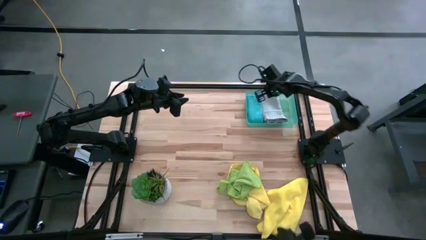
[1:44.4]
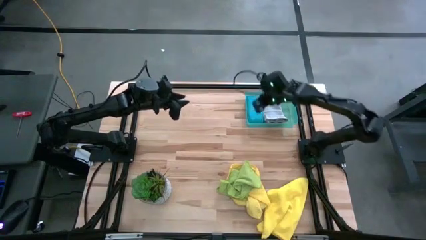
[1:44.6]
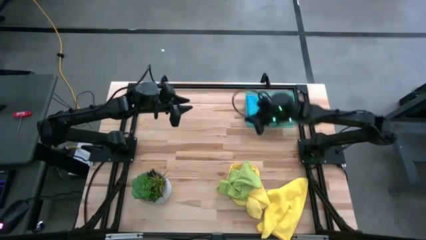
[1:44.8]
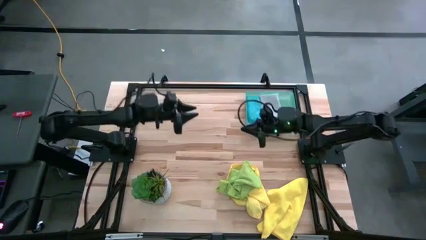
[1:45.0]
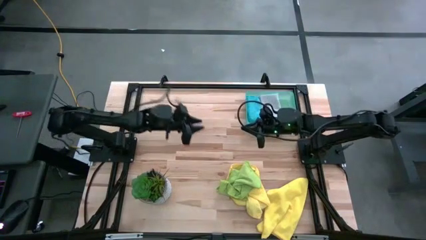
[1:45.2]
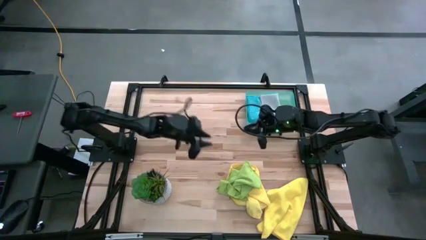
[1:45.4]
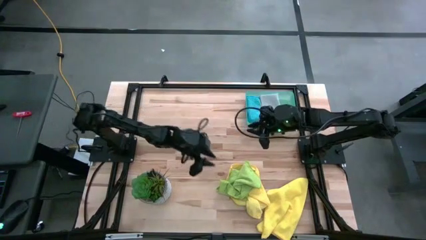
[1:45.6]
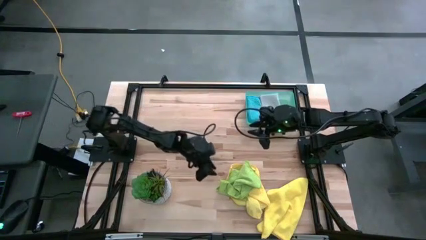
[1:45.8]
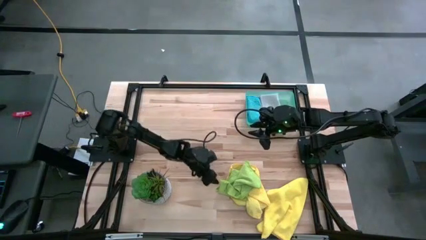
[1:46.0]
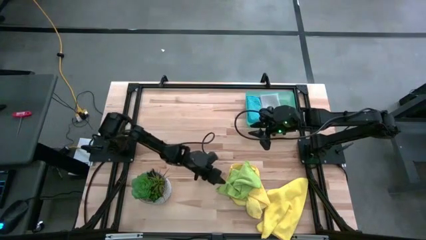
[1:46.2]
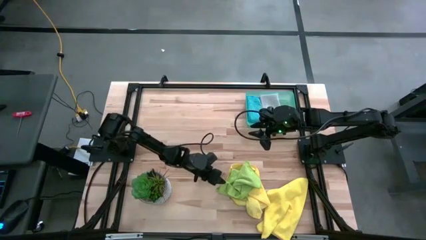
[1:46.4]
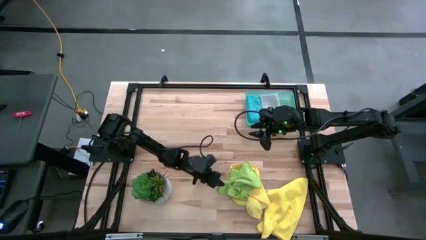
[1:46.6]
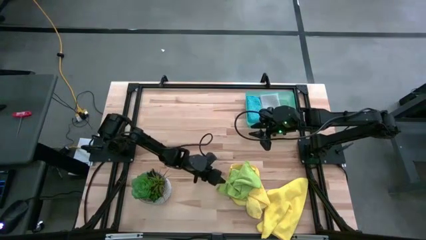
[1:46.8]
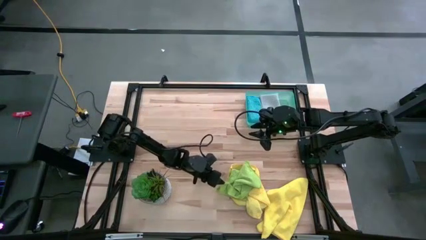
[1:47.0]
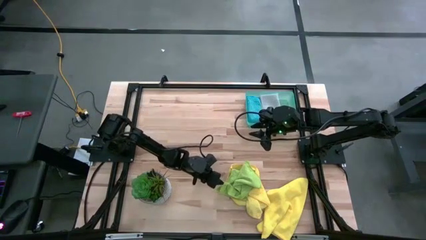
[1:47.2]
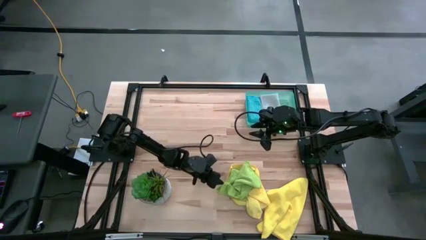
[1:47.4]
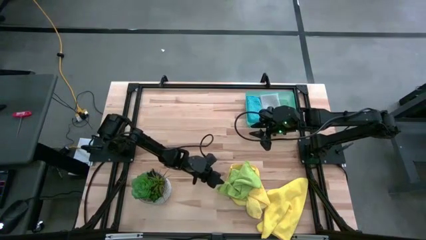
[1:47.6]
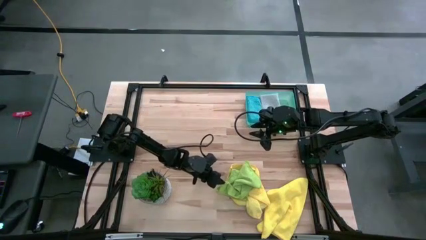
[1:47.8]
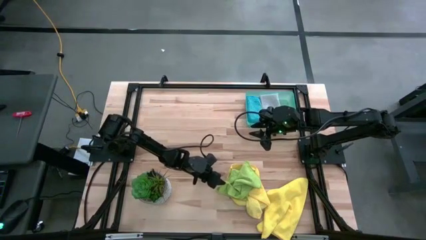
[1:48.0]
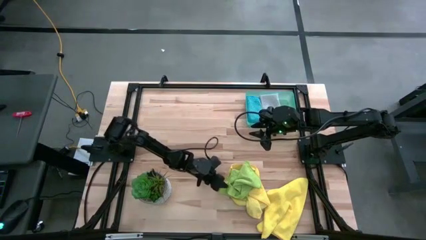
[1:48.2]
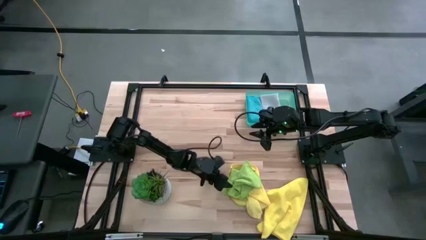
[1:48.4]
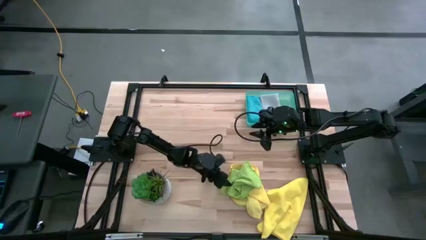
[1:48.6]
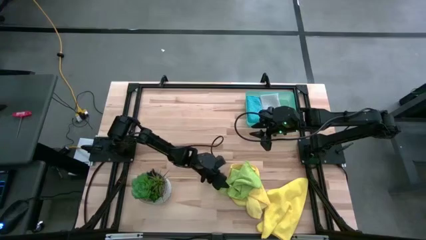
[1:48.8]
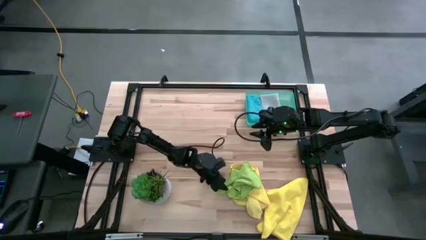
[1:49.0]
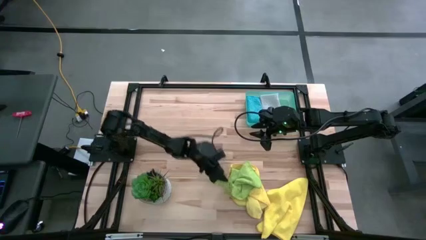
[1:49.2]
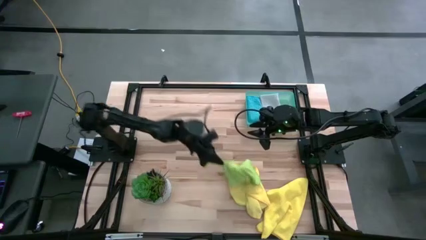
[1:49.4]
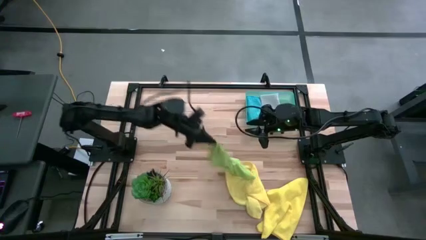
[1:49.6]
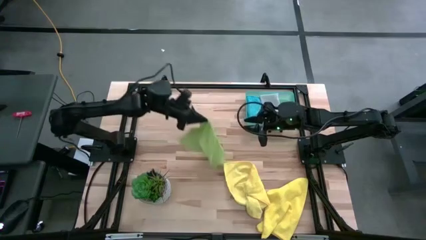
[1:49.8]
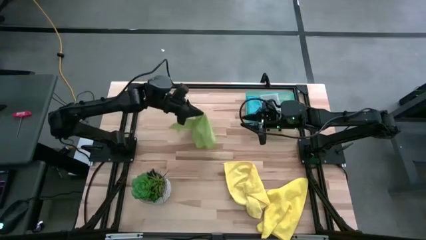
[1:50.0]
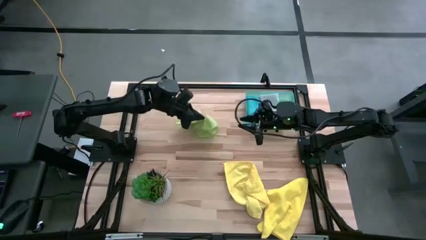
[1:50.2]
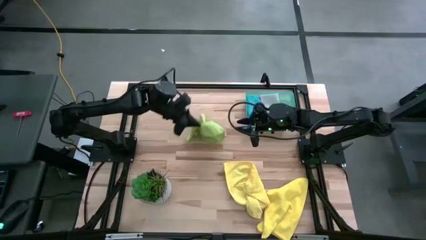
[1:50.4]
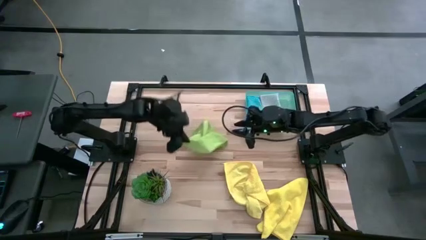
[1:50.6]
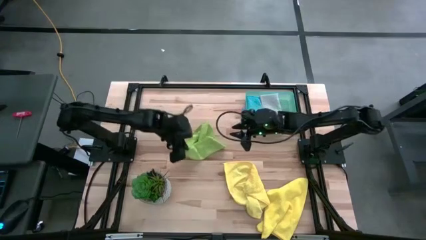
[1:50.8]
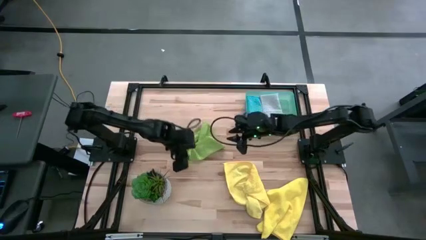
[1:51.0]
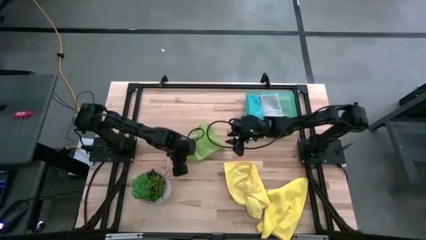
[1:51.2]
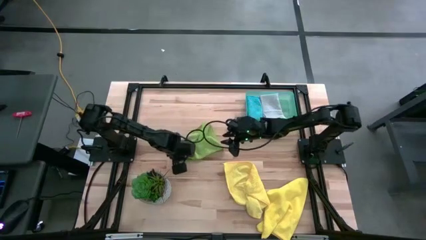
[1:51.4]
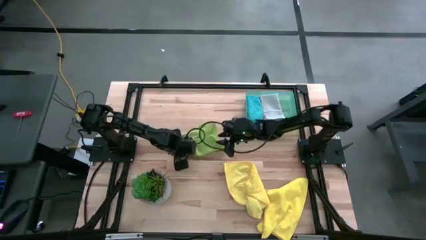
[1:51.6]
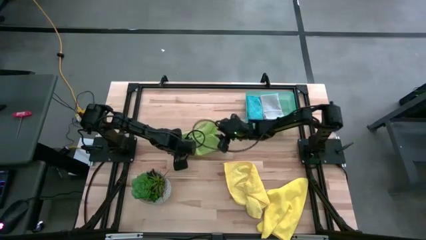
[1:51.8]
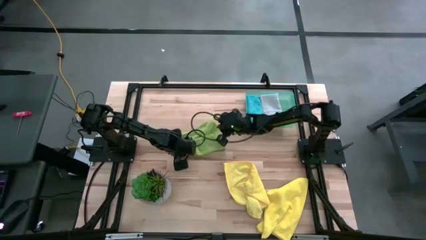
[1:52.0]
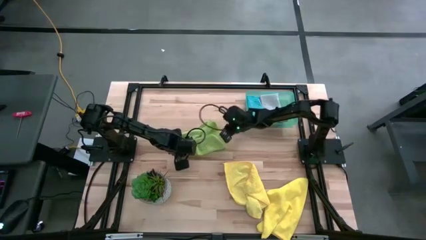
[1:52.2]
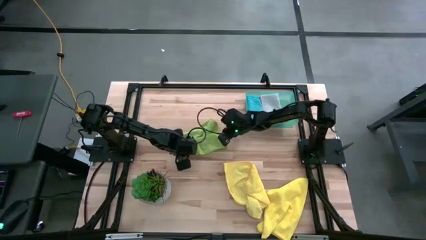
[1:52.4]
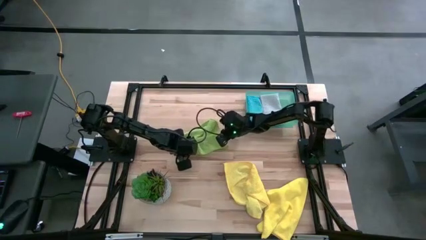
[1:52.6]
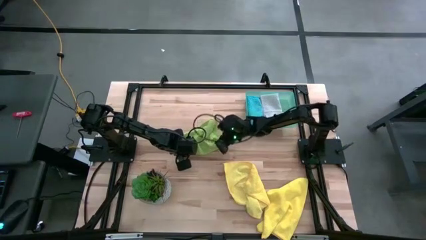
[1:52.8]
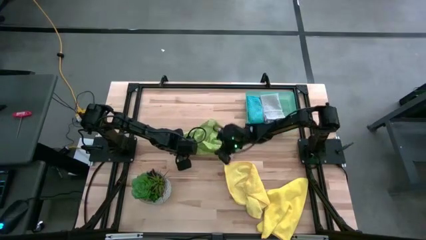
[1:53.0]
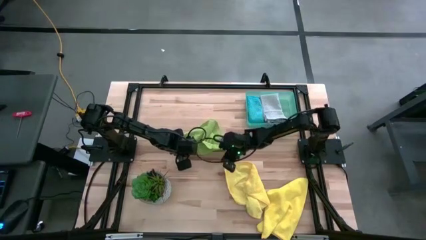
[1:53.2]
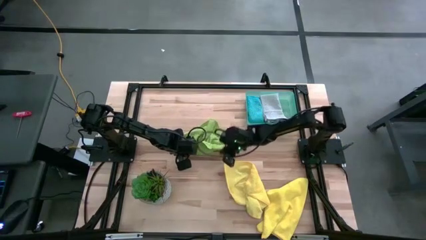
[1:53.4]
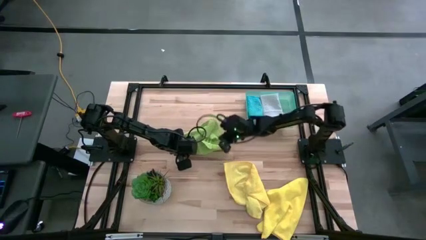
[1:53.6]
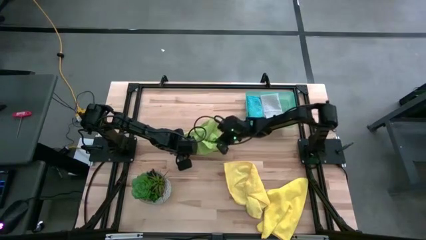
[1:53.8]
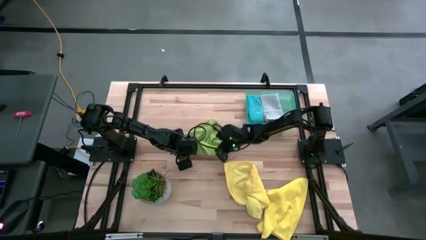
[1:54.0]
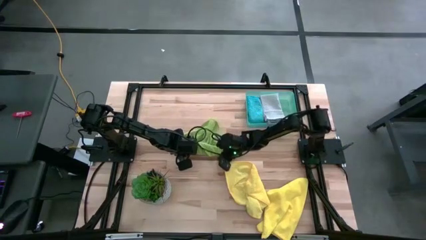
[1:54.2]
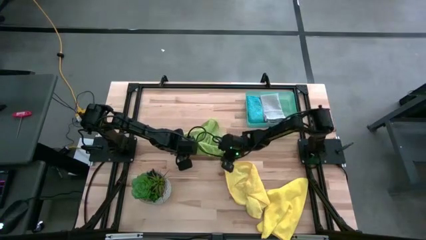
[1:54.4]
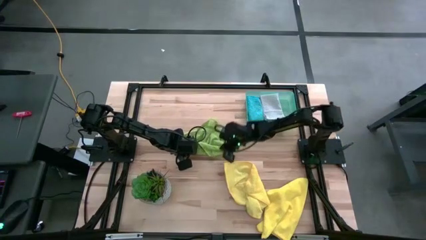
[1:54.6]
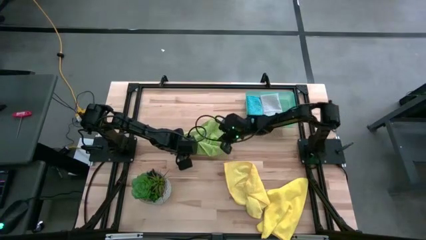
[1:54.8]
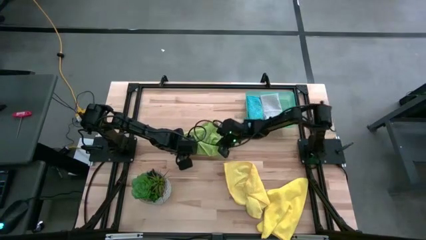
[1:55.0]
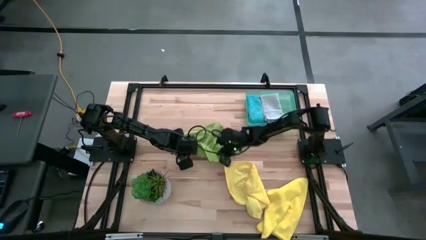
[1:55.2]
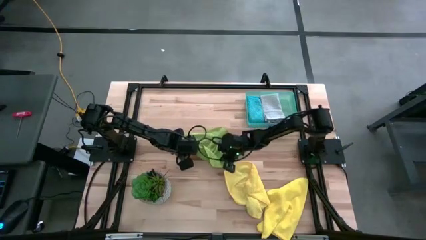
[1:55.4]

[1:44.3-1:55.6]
Task: Fold microfiber towels
Fold the green towel

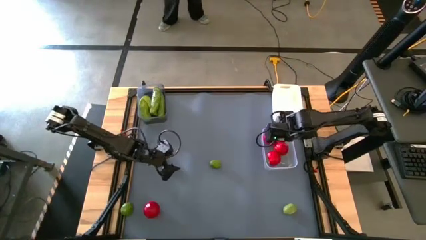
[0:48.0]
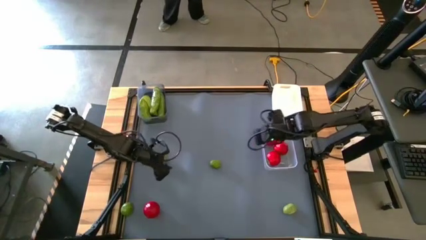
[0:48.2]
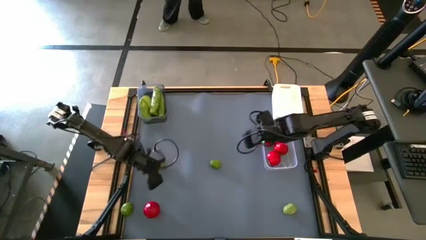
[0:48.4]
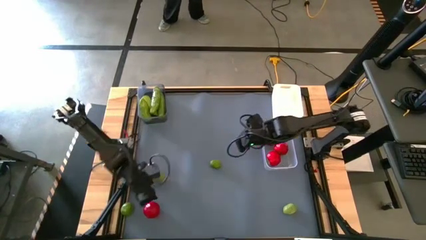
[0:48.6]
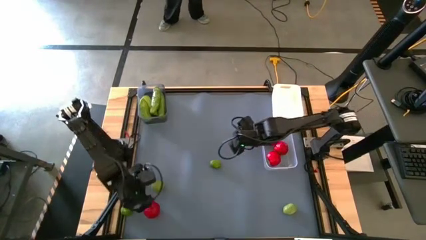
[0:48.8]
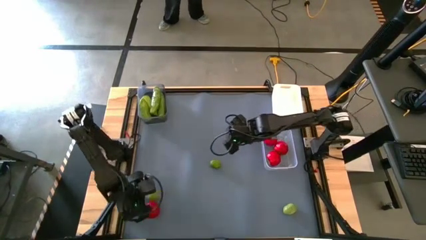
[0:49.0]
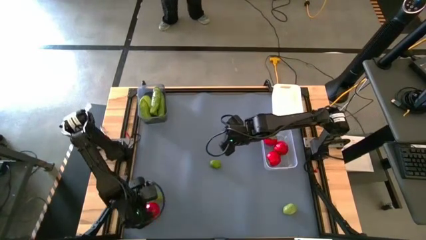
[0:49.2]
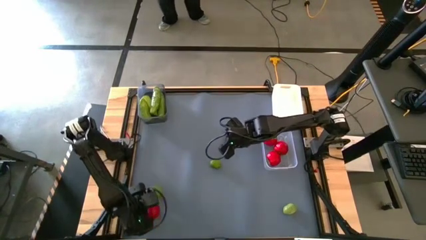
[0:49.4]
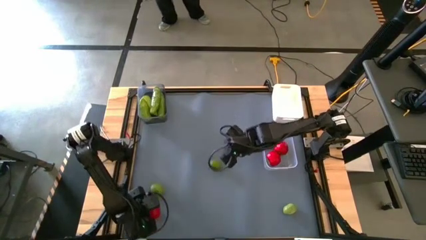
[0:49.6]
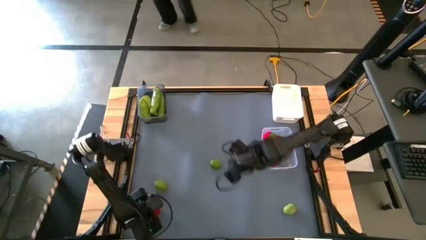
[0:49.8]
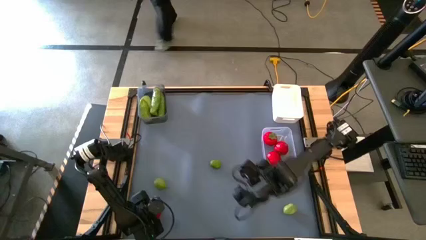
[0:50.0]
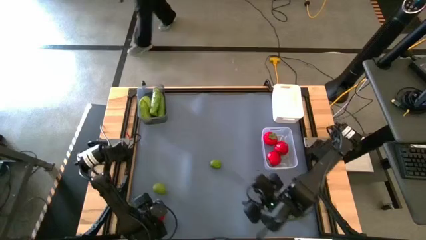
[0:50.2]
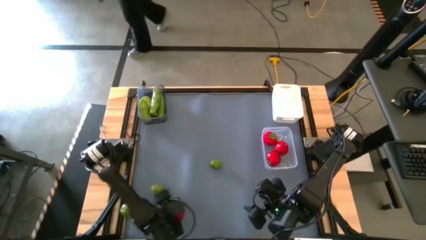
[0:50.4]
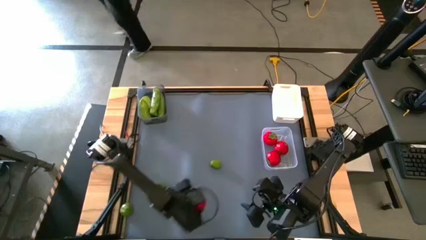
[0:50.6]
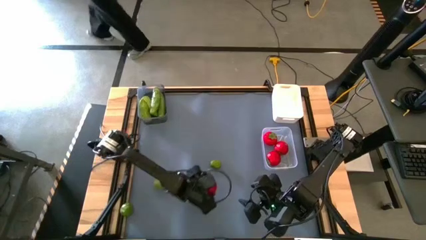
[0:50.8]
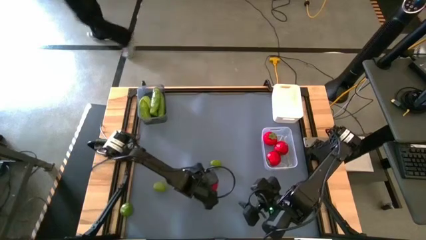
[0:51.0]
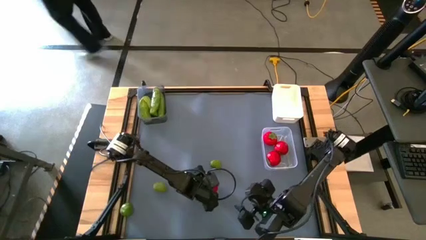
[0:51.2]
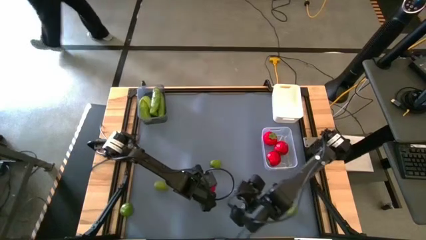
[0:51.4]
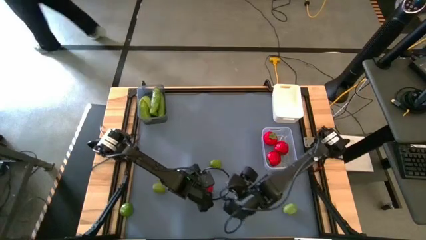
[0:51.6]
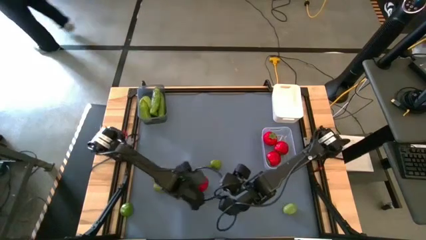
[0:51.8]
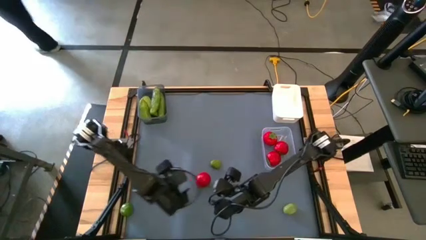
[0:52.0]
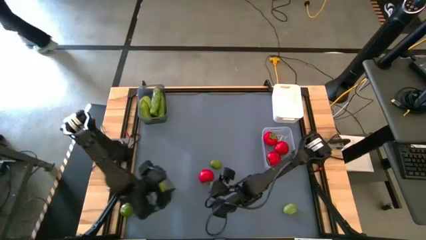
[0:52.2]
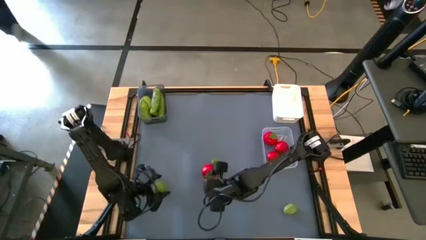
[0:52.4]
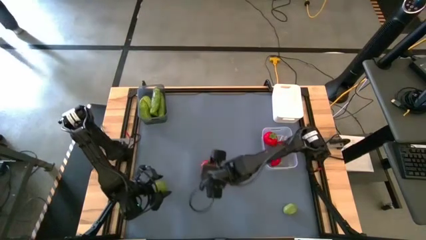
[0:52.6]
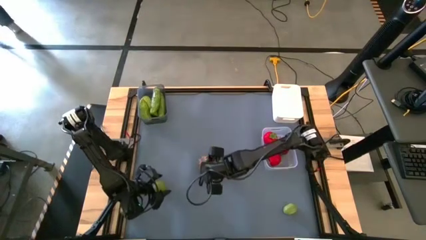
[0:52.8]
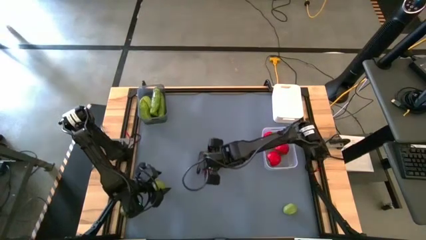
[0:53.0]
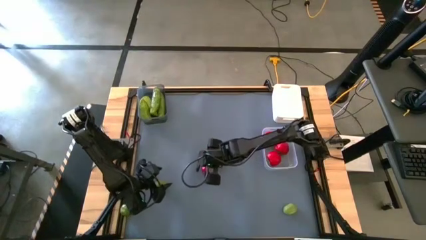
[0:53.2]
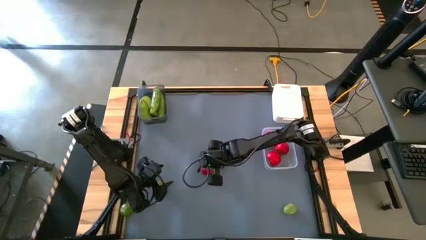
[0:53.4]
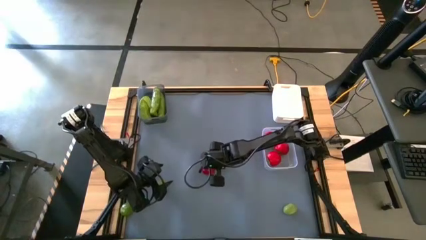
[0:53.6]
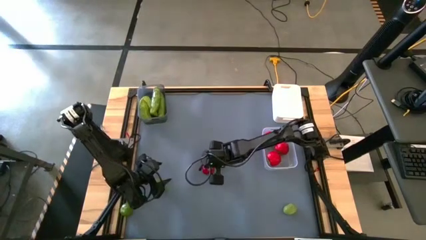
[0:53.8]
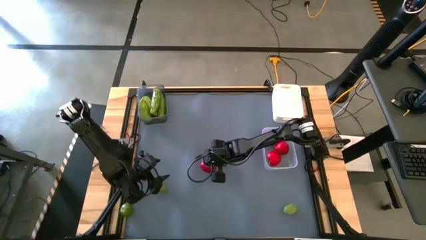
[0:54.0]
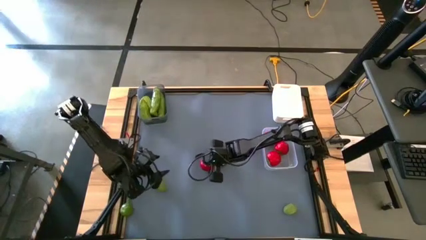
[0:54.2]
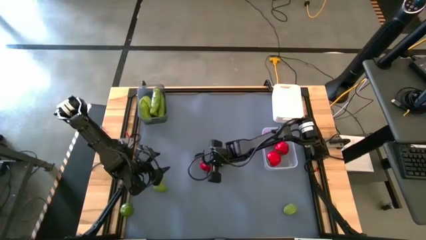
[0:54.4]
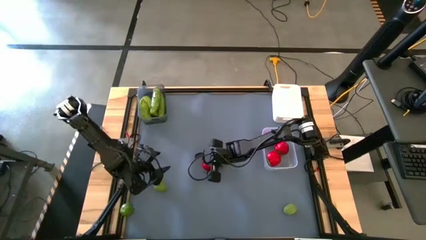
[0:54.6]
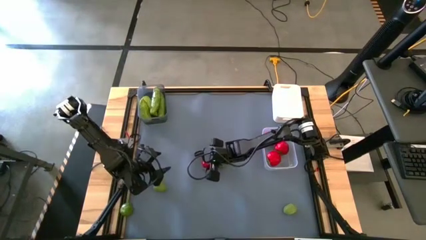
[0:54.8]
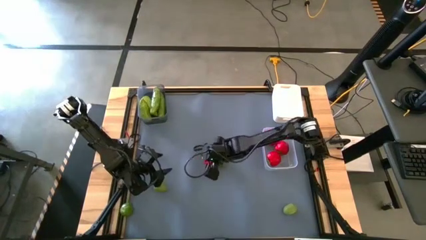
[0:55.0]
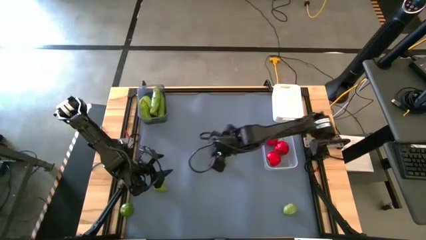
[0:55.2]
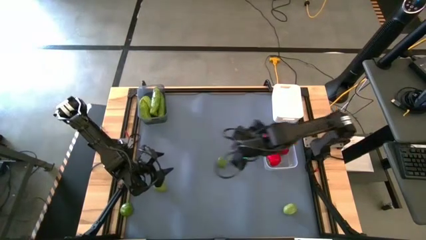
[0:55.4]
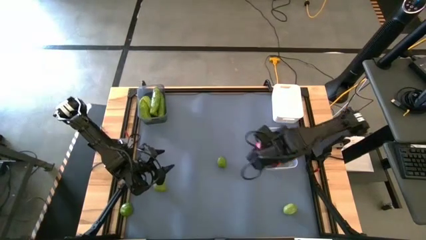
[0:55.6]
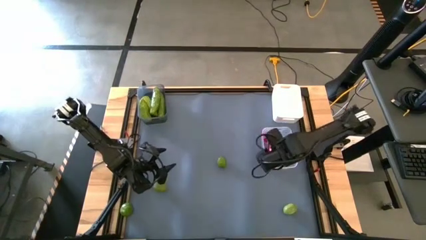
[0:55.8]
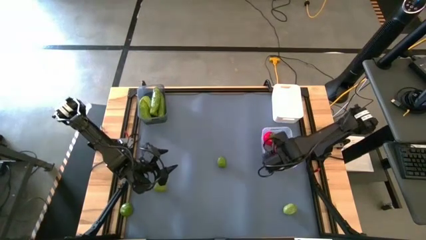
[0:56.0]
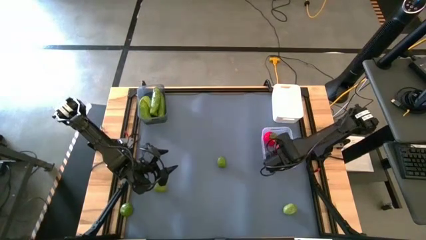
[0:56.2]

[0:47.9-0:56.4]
Task: Sort produce into baskets
Put the tomato into the transparent bin
